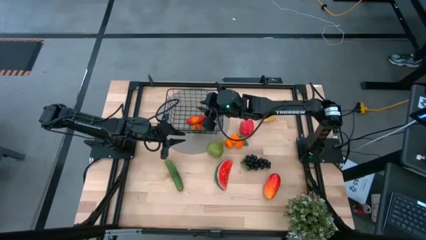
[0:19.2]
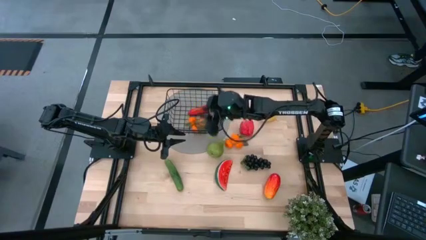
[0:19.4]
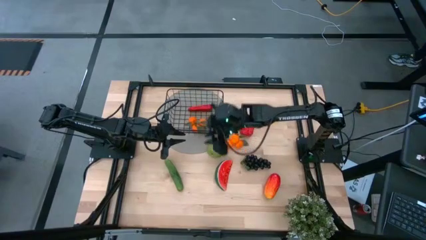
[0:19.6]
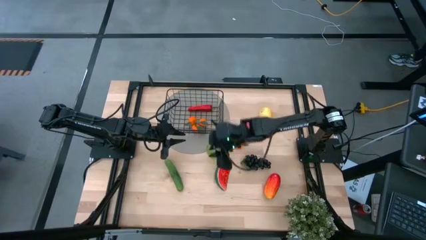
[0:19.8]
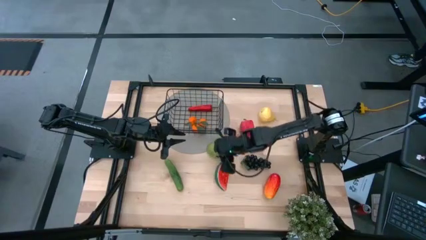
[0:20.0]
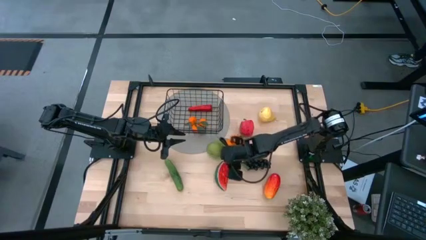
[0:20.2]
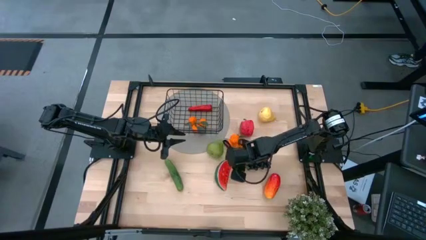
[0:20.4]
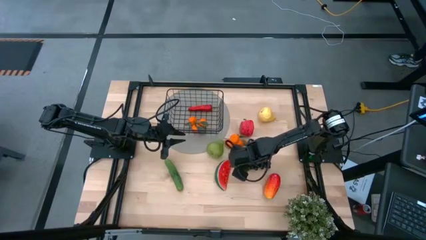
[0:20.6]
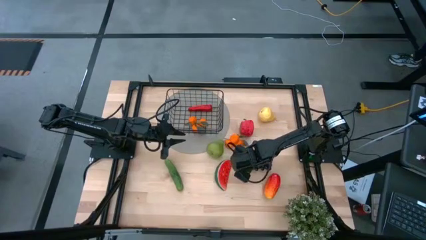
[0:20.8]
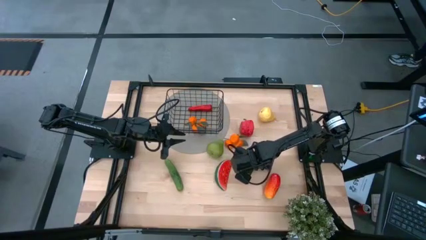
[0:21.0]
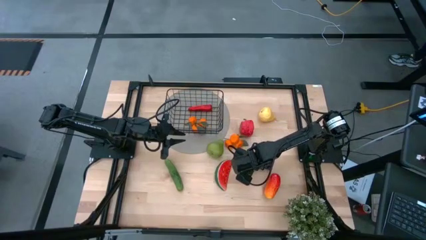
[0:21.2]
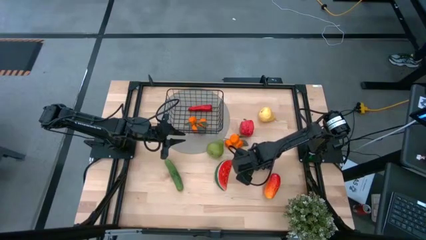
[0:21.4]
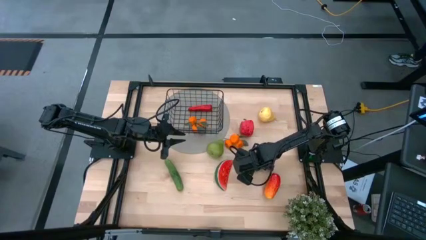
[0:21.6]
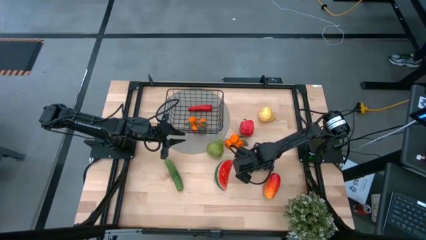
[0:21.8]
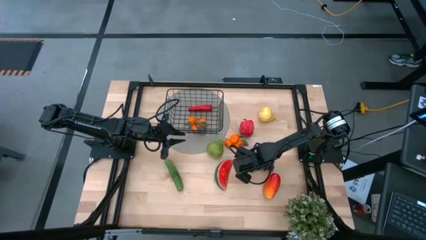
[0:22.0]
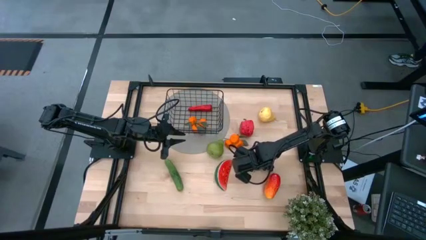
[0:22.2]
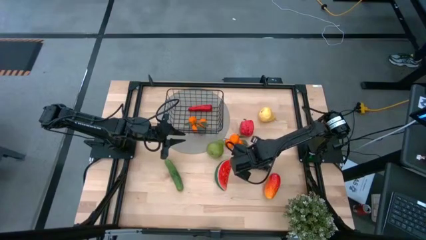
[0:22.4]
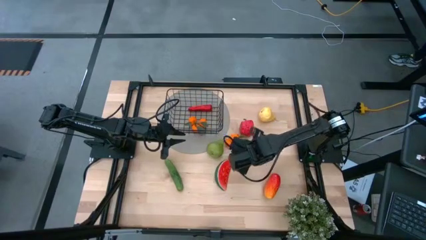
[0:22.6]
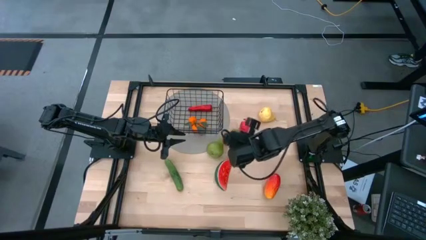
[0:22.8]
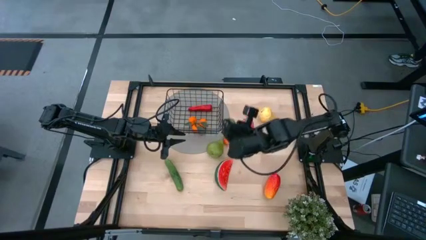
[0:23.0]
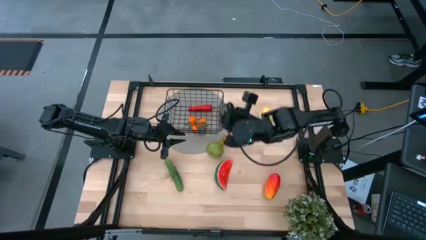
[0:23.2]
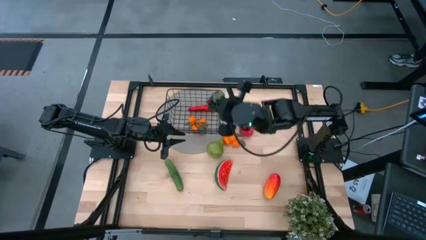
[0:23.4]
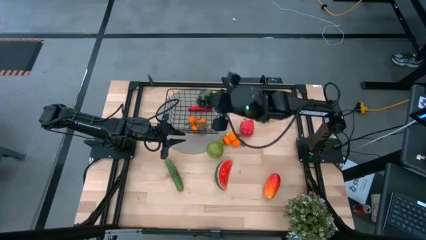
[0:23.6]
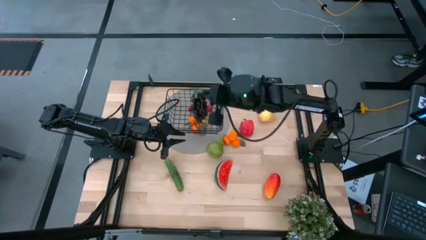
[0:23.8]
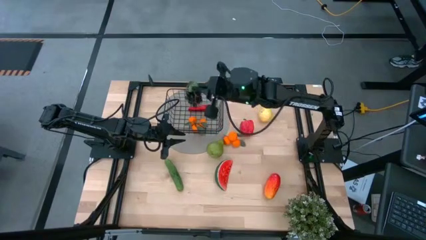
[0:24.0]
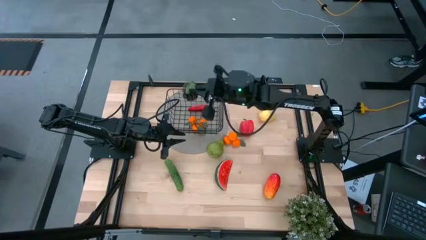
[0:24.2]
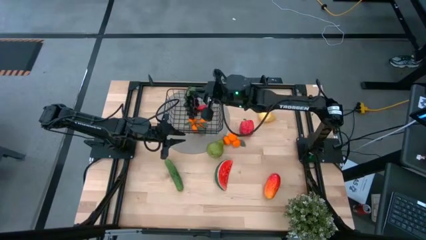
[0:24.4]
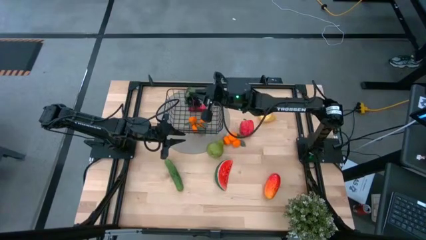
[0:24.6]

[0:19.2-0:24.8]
Task: Build produce basket
Put the black grapes into the wire basket

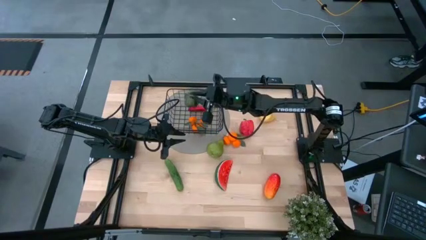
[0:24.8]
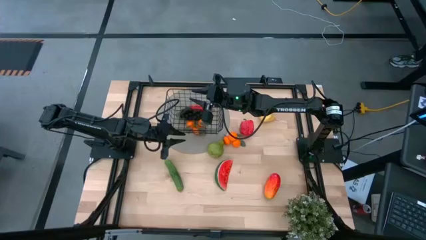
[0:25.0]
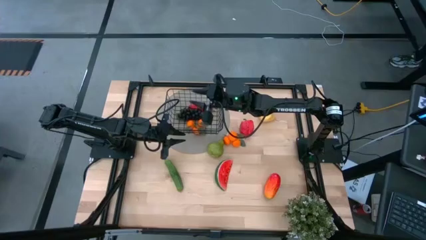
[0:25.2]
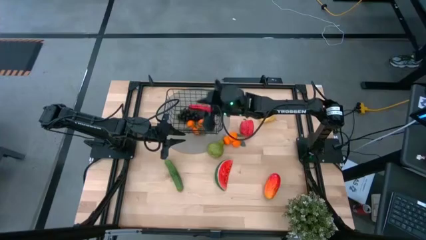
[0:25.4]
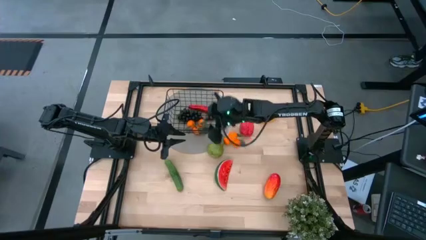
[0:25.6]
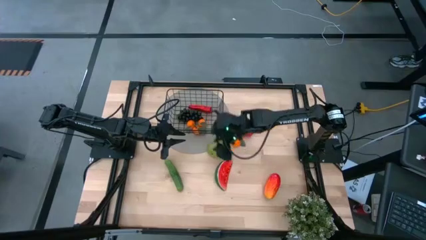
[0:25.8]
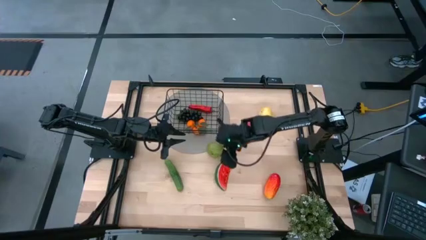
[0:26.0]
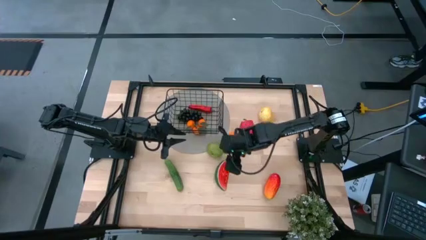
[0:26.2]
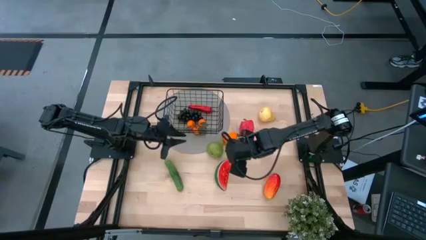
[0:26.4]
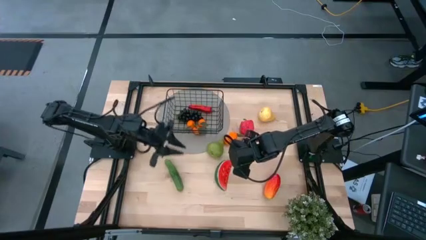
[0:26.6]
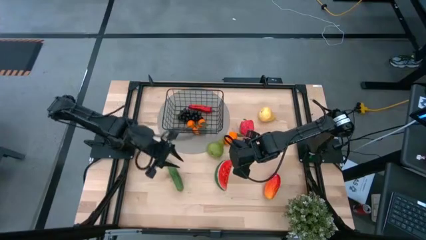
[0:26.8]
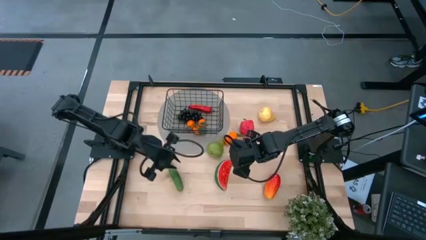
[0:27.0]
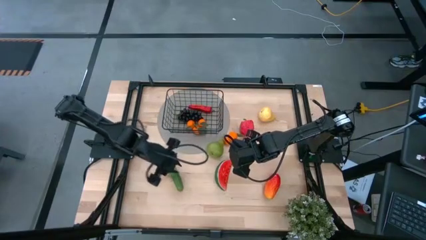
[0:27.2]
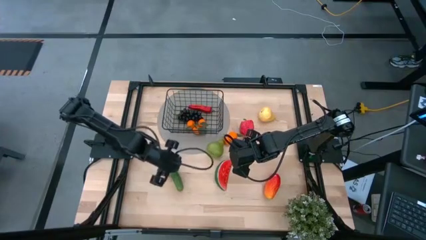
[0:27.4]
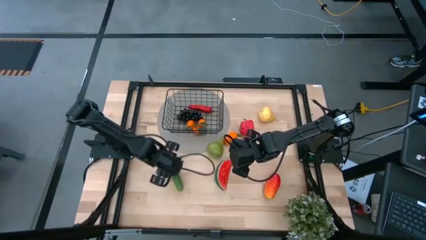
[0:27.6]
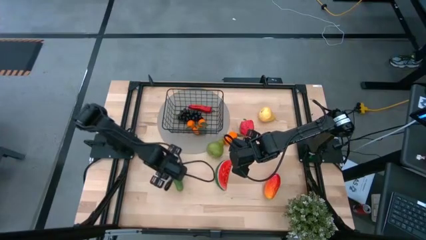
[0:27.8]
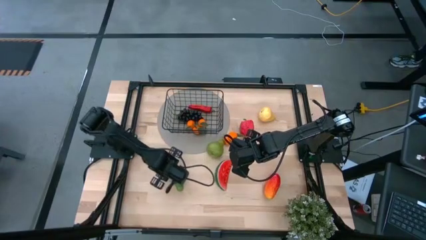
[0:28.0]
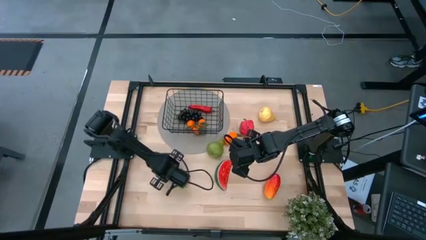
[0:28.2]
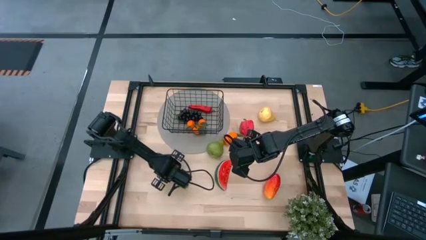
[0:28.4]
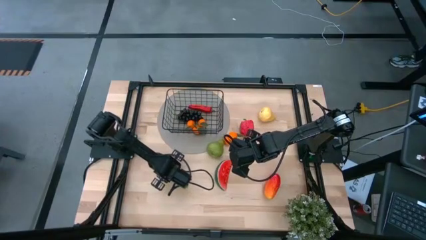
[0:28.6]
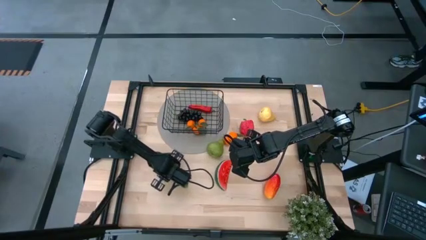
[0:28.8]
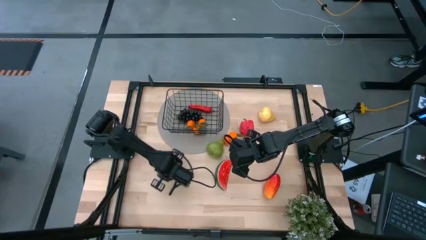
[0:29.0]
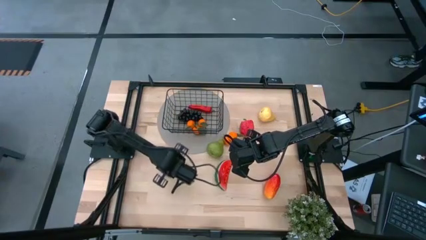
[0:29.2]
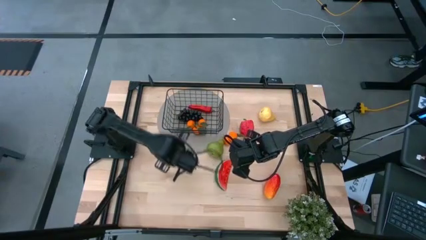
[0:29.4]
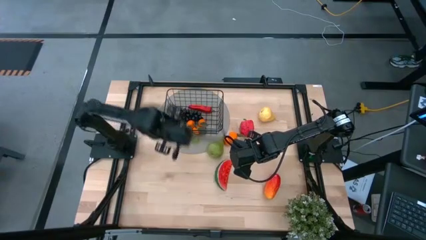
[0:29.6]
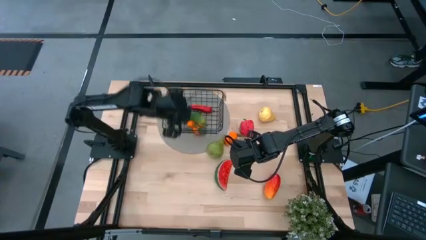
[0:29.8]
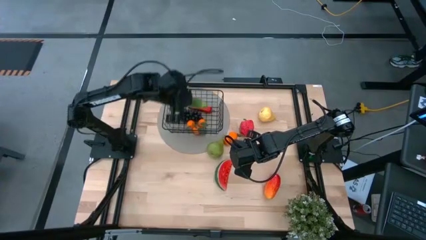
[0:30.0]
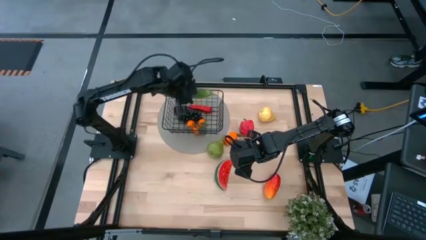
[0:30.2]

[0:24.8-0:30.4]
Put the green cucumber into the wire basket

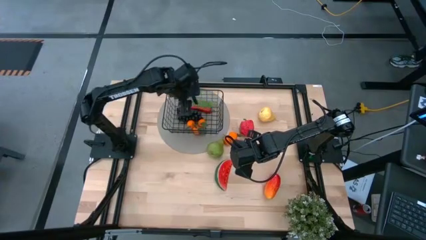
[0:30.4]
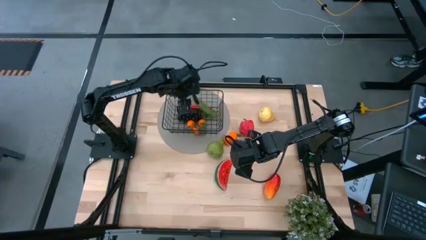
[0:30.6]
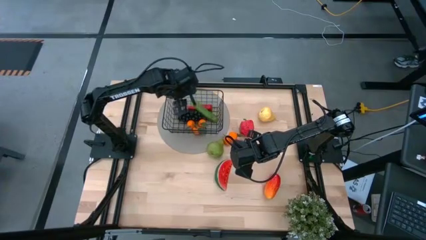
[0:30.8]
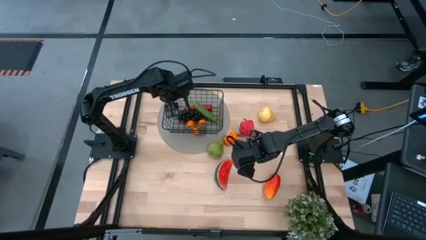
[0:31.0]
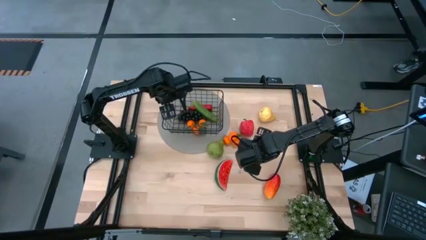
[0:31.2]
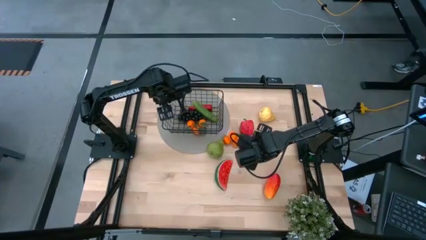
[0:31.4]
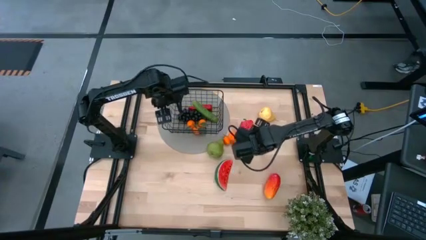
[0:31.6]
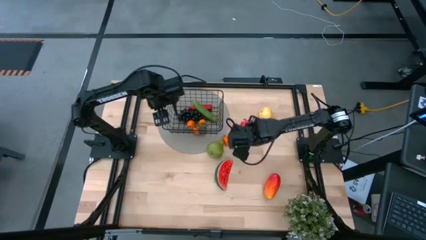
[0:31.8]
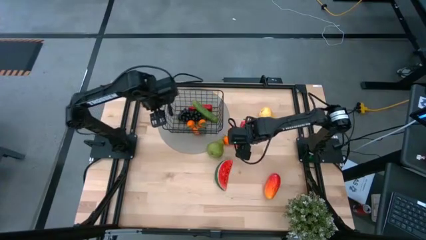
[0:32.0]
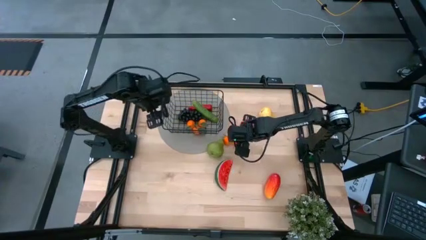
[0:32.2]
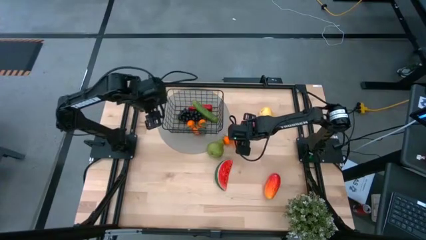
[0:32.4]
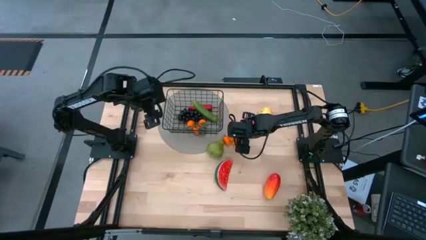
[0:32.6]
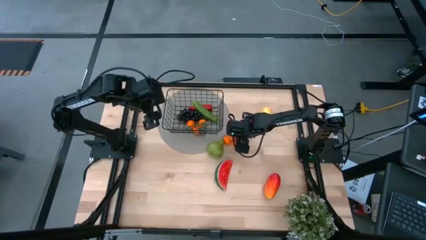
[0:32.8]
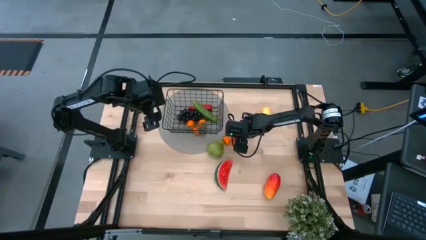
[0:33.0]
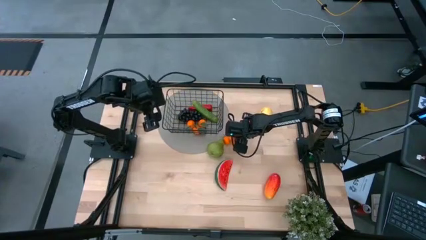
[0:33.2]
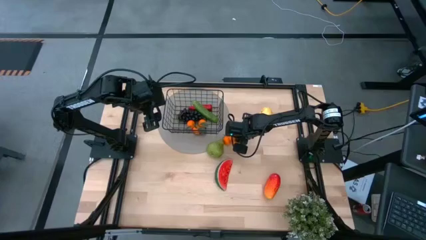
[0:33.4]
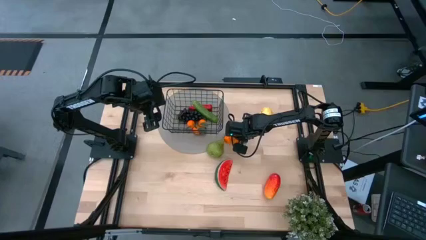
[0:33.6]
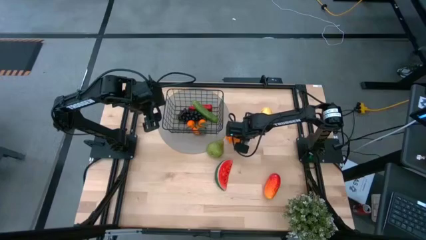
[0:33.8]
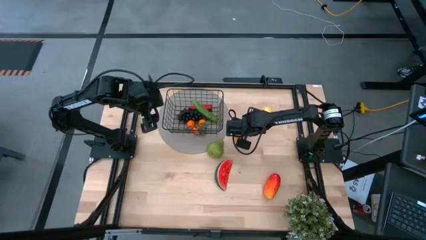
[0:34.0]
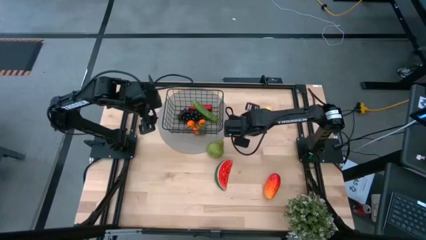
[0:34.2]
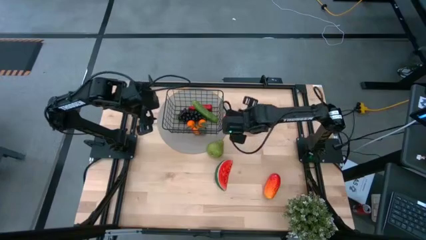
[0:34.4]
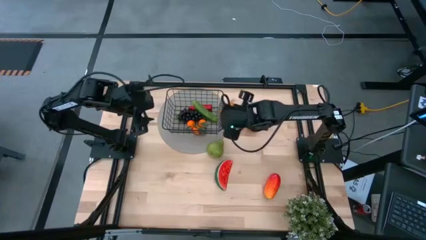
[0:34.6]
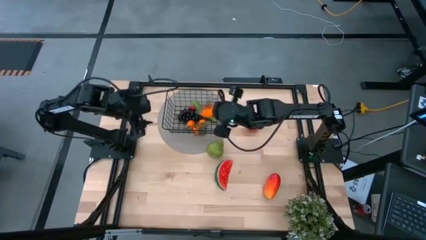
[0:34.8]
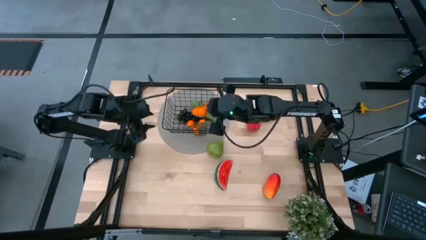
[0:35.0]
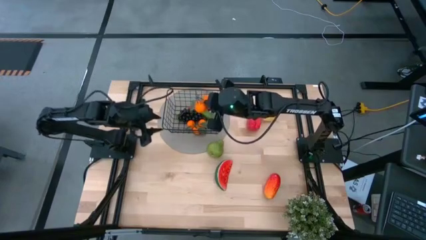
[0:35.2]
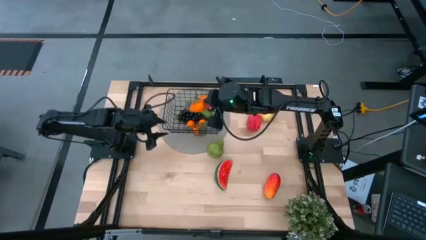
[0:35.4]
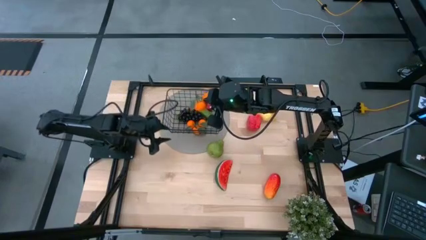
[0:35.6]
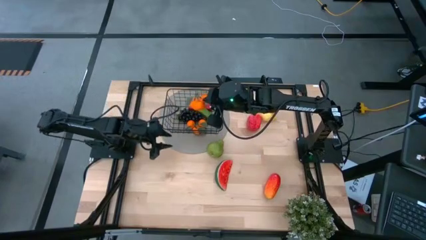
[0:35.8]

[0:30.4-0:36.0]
Put the tangerine into the wire basket
